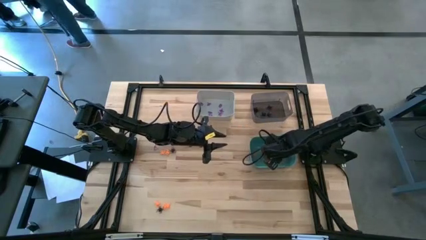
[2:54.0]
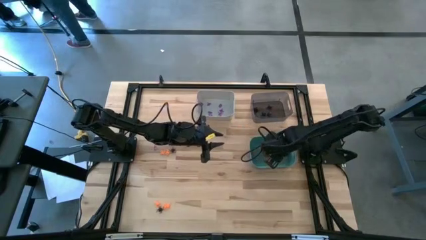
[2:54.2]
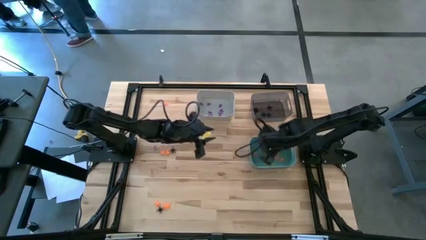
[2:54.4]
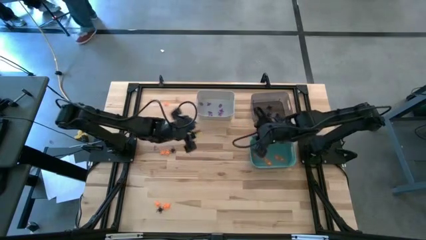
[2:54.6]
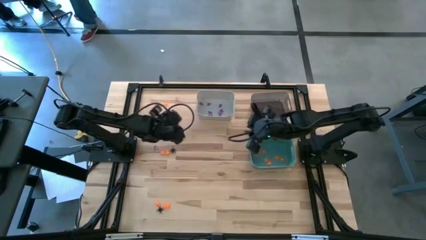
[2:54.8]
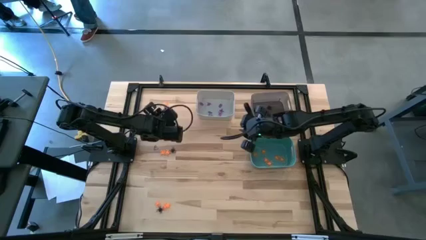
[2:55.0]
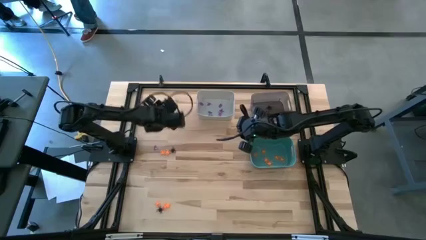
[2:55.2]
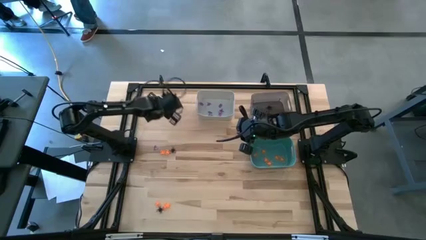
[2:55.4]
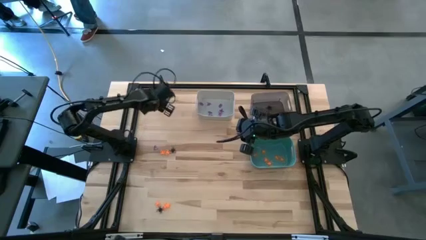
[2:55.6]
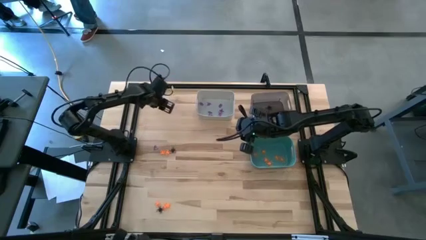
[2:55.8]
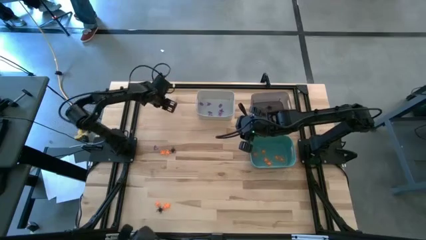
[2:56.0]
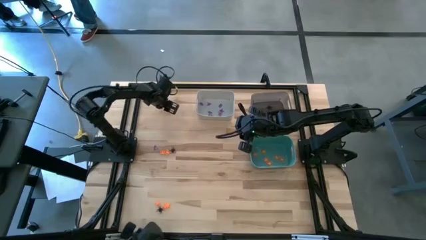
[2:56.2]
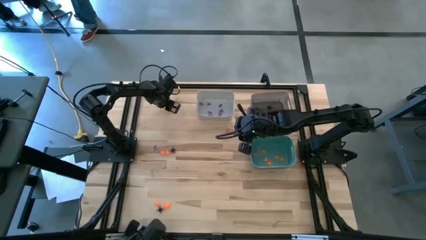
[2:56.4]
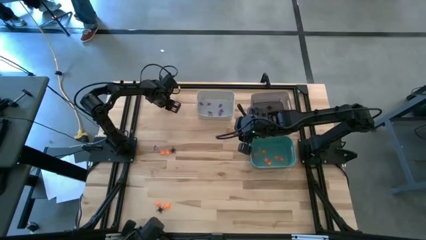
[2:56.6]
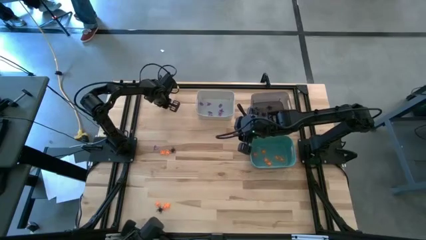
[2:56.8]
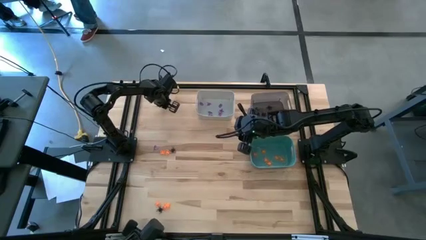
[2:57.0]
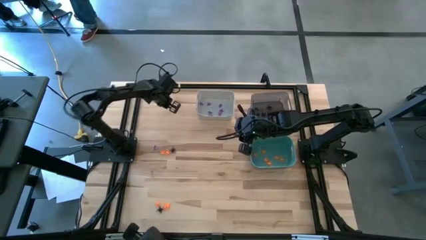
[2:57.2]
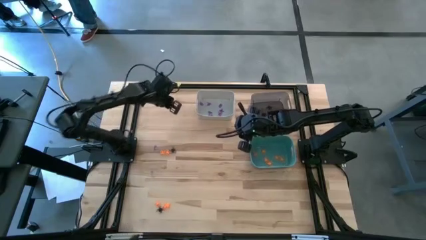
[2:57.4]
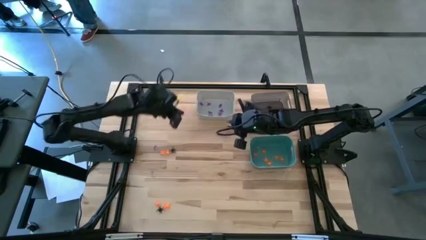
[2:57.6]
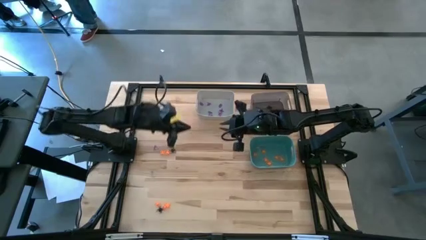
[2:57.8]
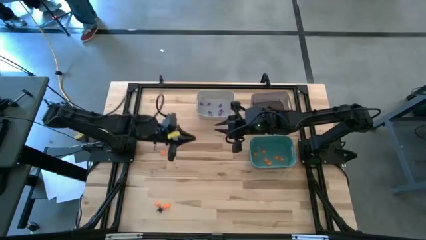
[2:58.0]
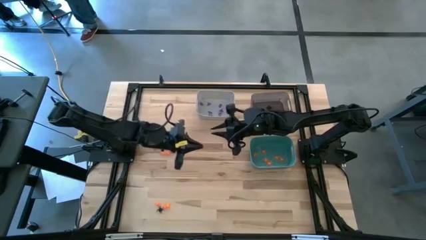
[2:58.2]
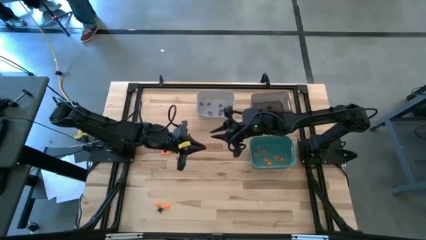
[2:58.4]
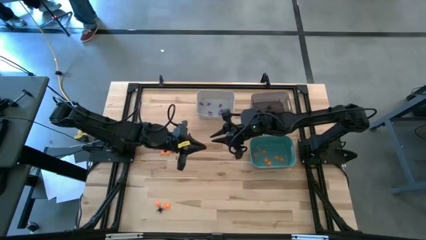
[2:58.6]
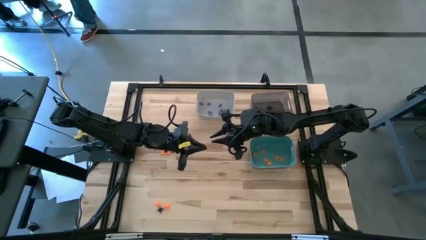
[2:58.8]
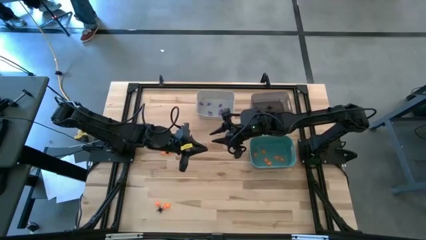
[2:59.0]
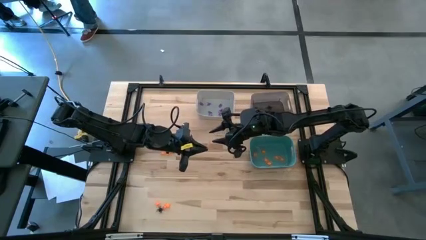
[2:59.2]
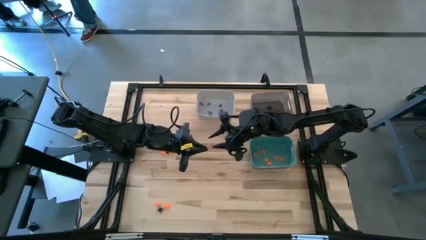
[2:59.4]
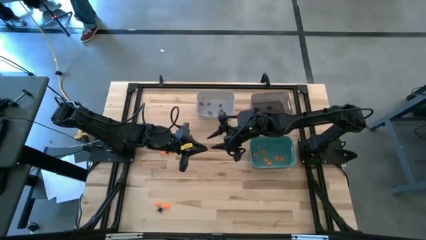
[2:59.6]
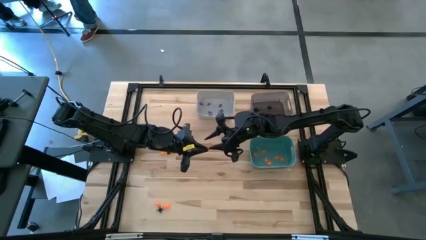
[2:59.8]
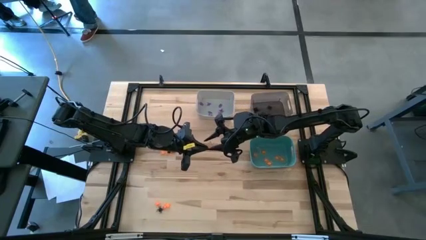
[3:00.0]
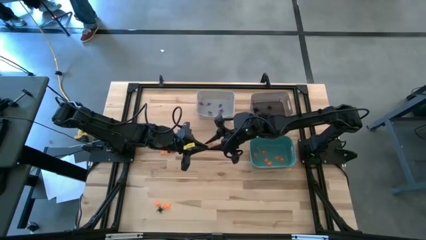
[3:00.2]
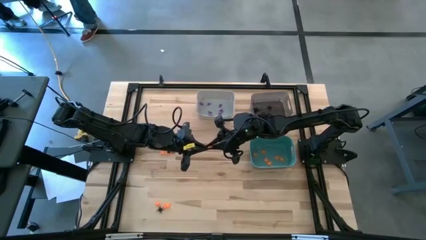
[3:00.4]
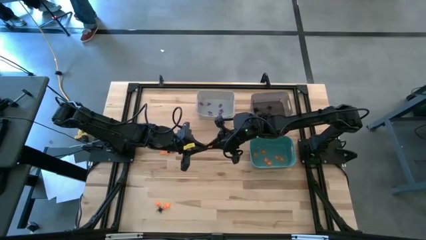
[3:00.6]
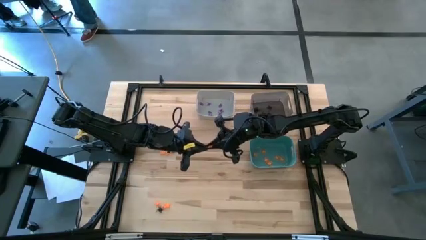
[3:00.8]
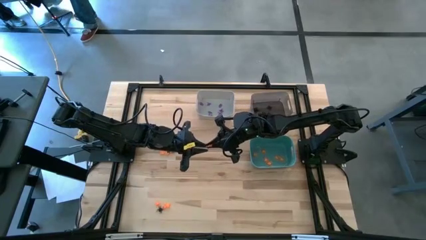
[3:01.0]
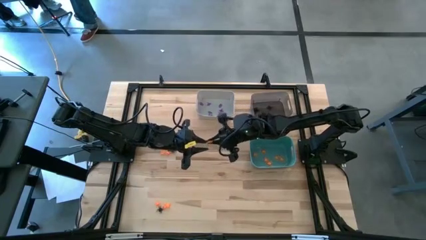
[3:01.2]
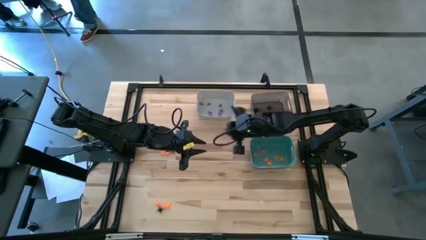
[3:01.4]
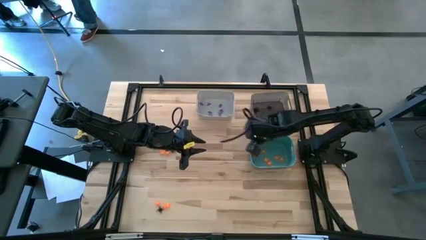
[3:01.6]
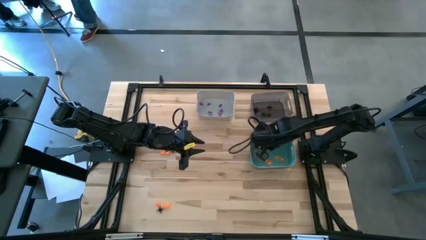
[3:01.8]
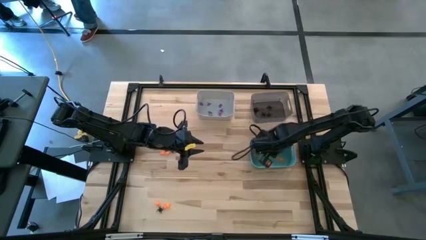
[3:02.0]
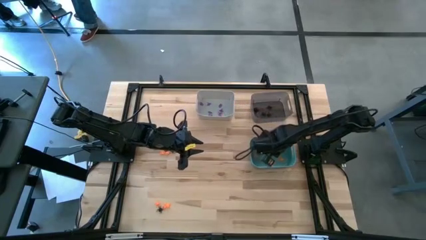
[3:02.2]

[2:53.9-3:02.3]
Task: Sort Halloween decoration
Put the orange spider toy into the green bin

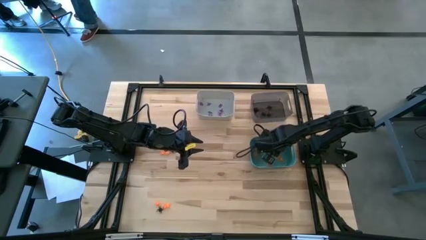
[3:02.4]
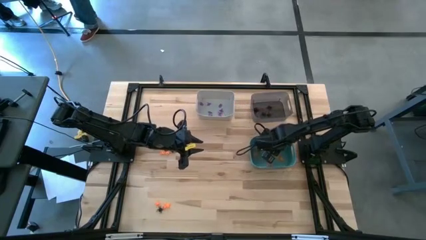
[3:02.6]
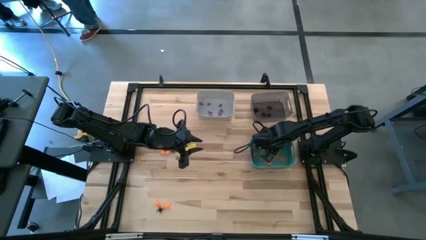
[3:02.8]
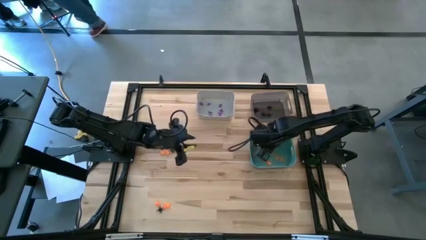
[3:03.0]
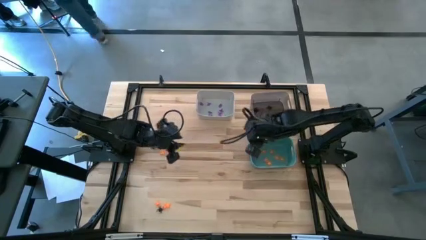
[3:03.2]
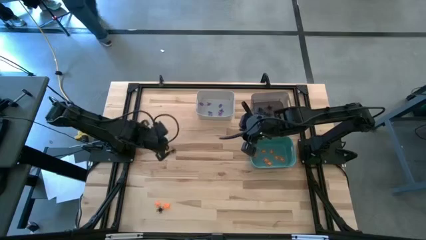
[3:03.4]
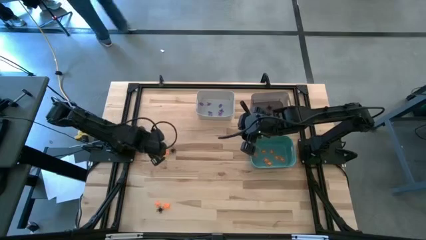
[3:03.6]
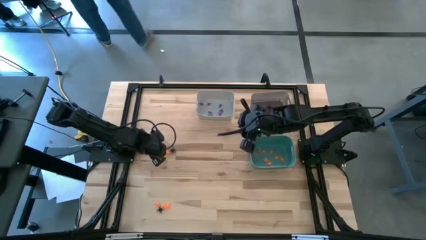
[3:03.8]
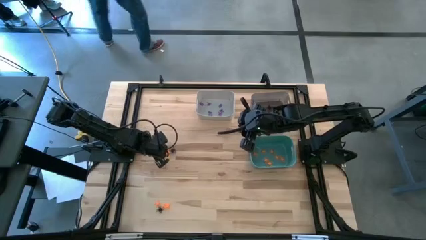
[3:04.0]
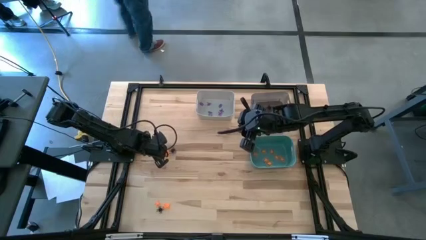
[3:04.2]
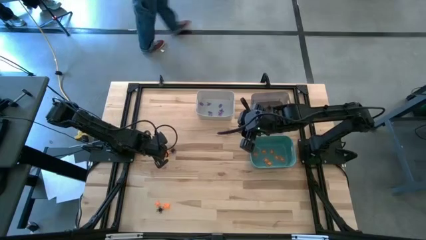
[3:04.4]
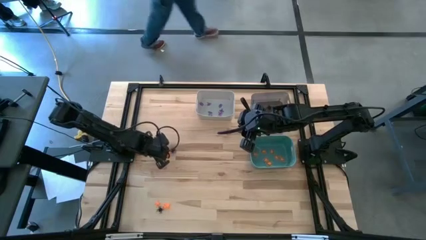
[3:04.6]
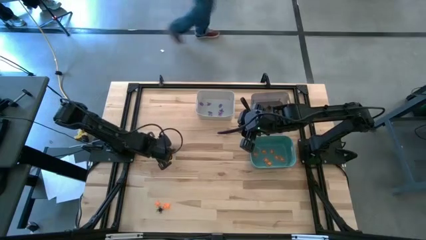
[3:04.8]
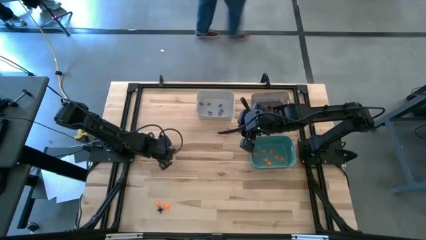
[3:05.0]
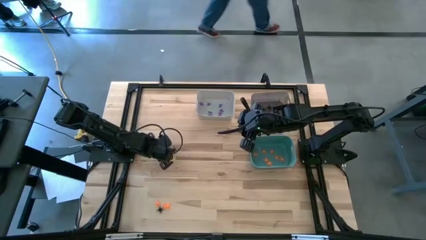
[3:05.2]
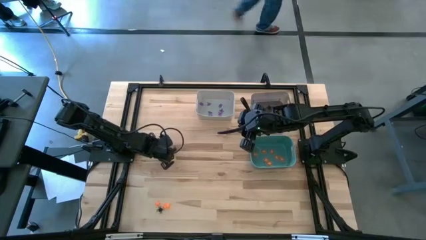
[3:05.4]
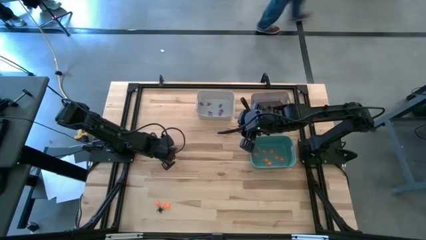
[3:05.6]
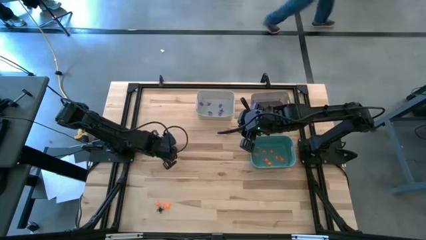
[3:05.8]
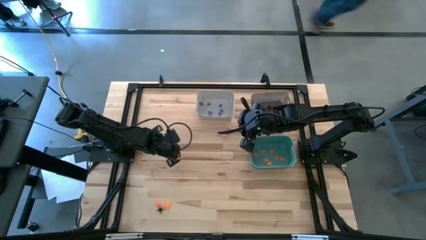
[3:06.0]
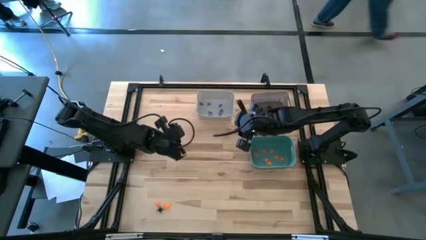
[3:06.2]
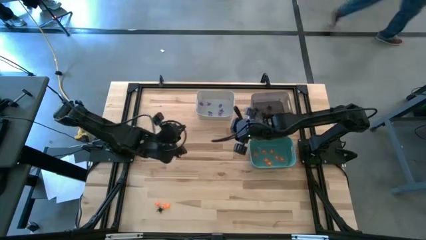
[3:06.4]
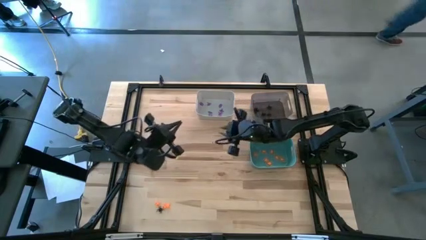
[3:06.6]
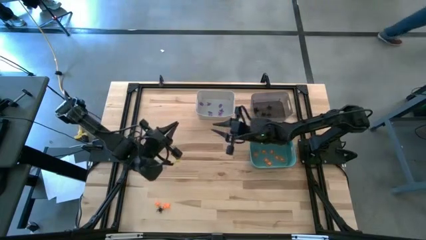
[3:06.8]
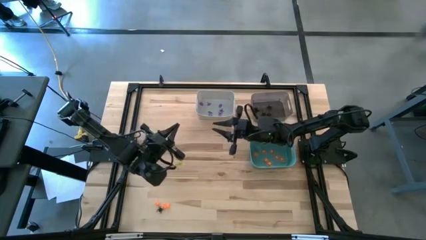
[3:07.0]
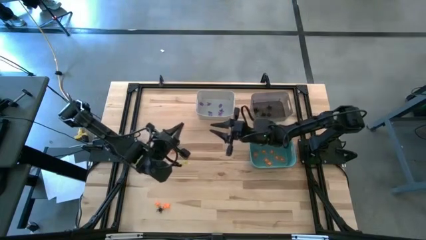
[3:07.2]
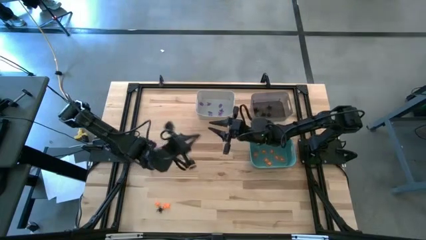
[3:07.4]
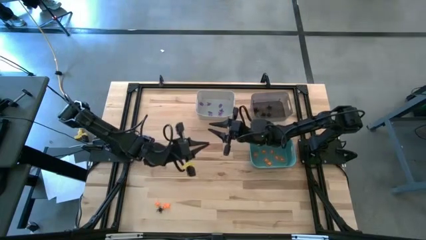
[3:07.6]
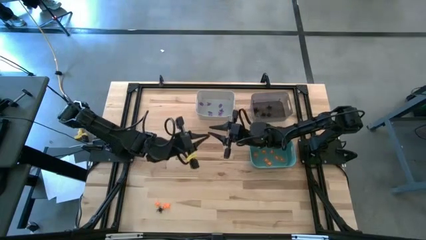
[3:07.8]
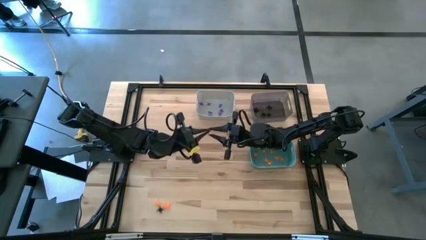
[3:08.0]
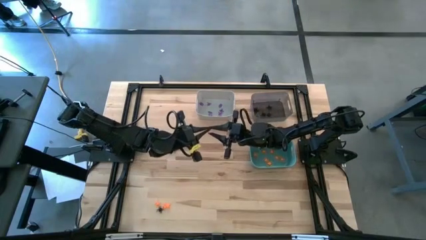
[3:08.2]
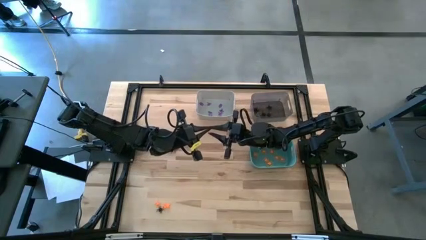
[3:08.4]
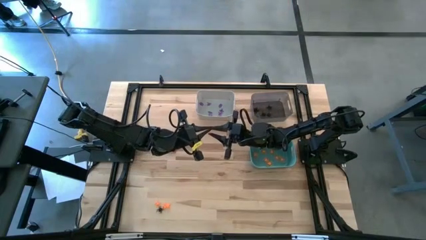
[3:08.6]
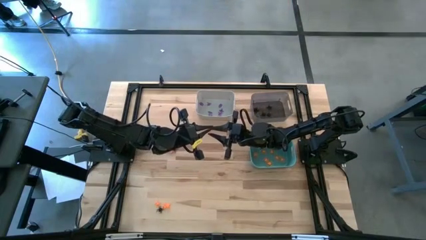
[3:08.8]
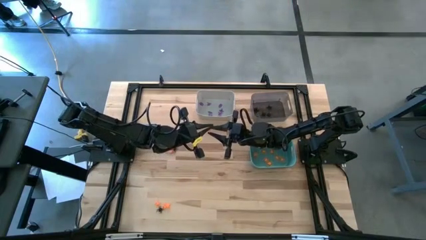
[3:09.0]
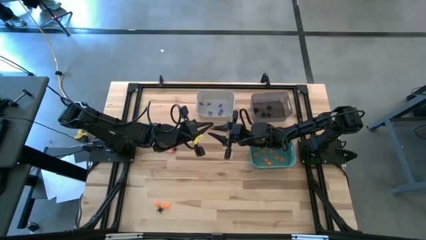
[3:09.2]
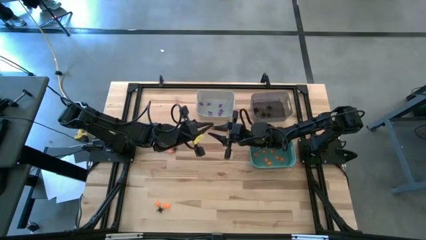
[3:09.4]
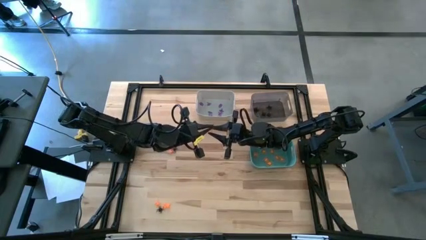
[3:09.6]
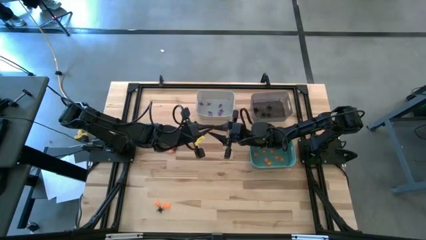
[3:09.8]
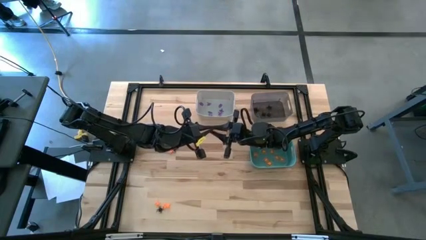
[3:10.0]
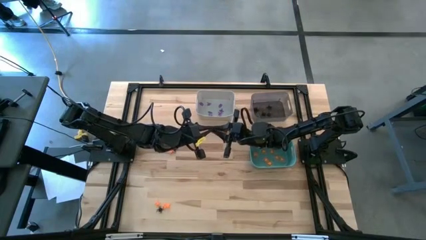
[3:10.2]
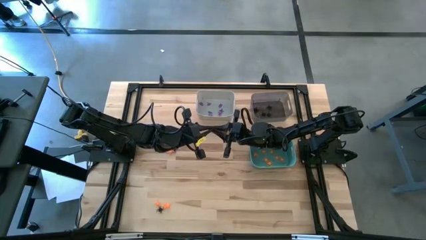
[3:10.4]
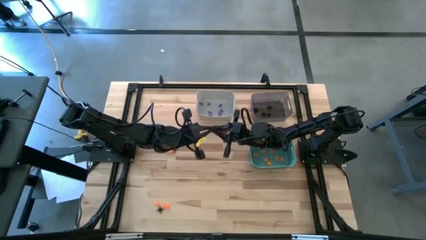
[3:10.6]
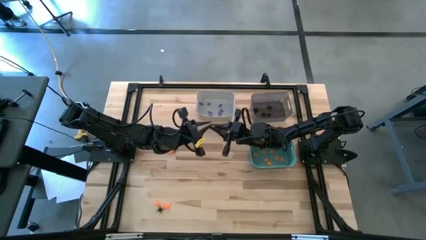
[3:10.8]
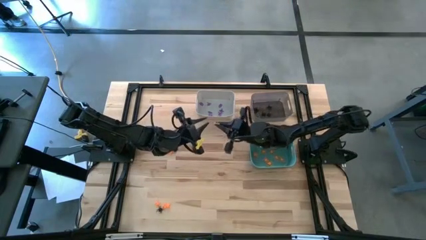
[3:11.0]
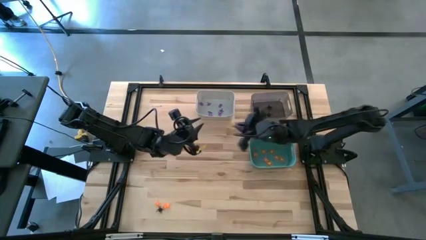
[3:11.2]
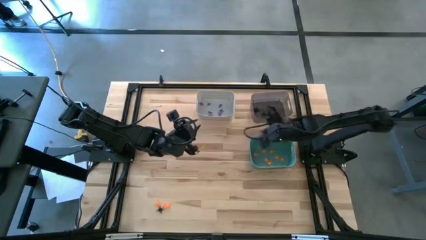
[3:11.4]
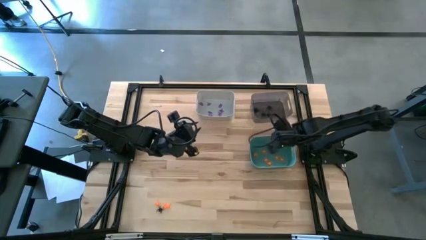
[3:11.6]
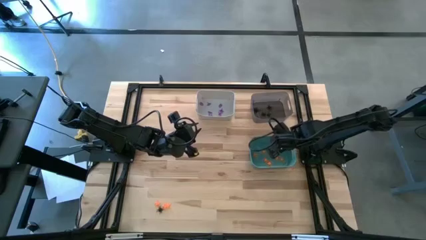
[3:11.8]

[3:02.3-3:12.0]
Put the orange spider toy into the green bin
